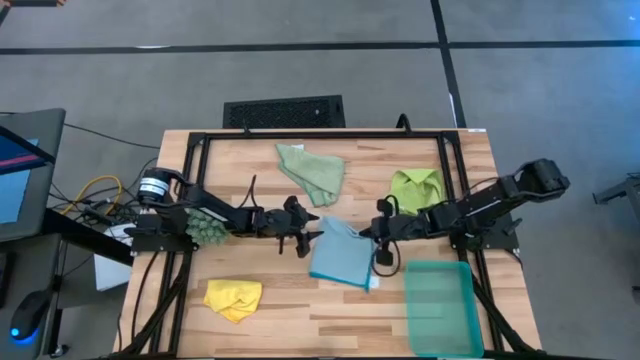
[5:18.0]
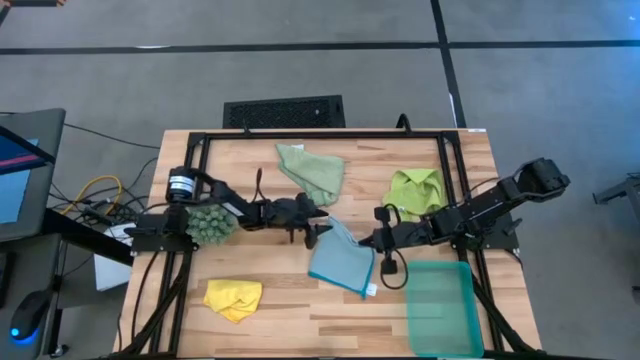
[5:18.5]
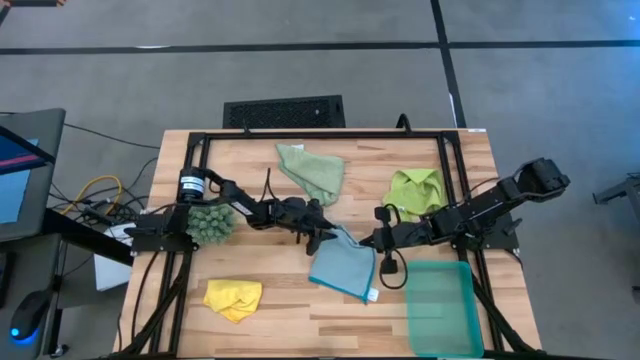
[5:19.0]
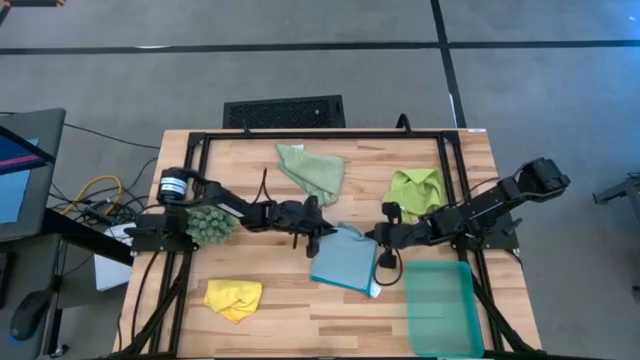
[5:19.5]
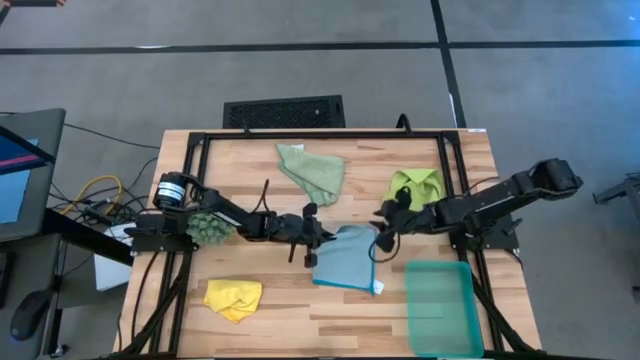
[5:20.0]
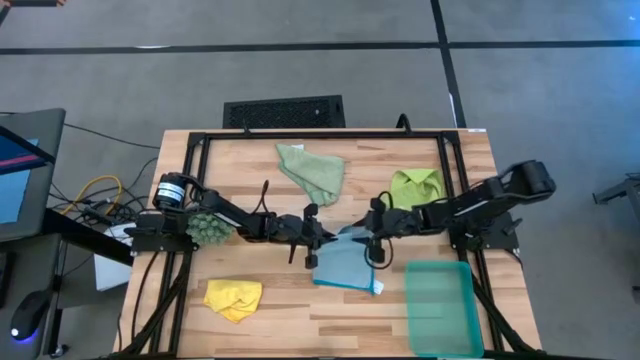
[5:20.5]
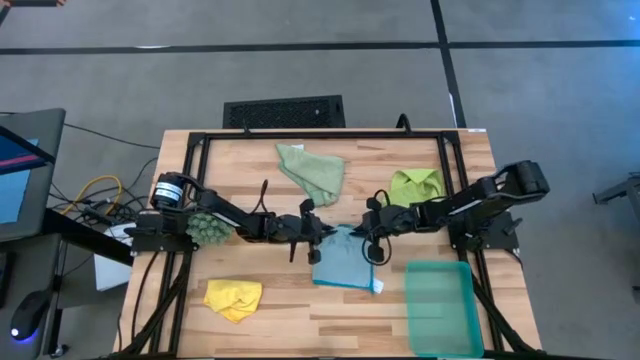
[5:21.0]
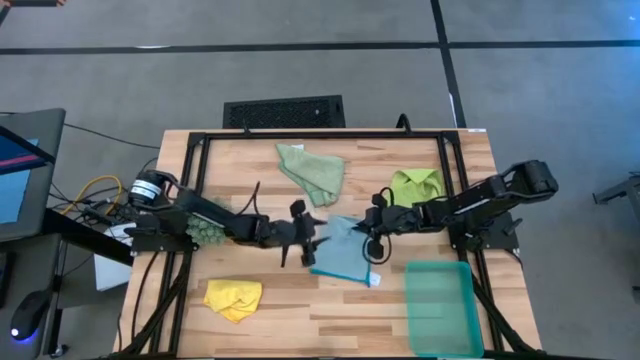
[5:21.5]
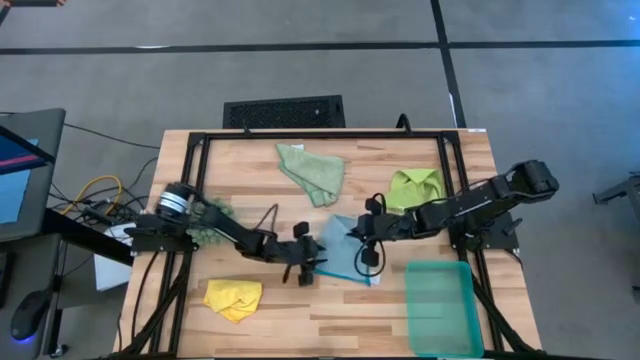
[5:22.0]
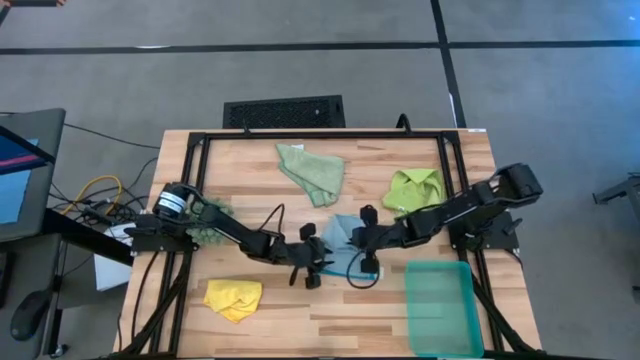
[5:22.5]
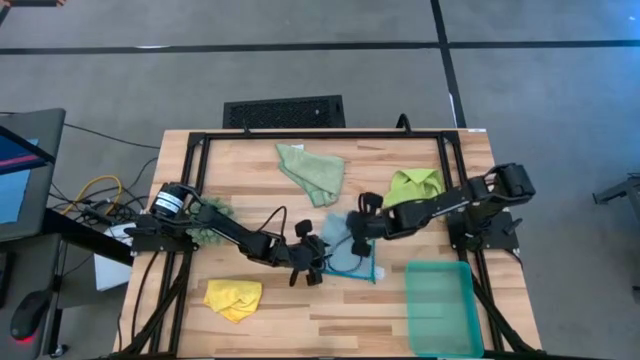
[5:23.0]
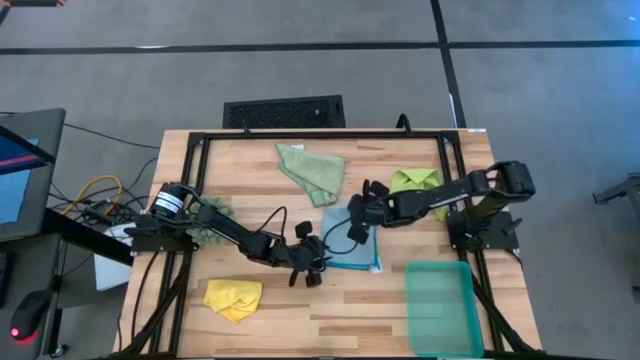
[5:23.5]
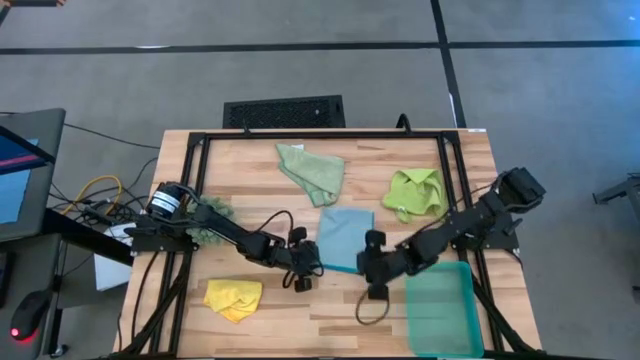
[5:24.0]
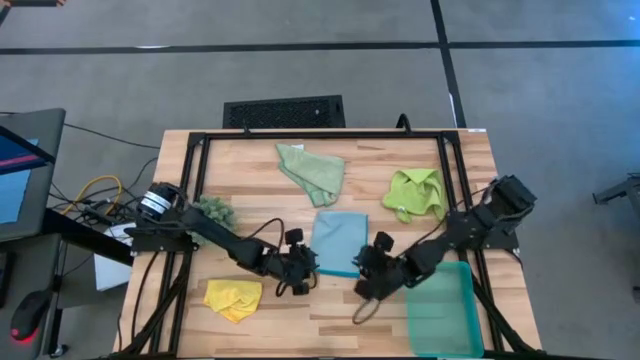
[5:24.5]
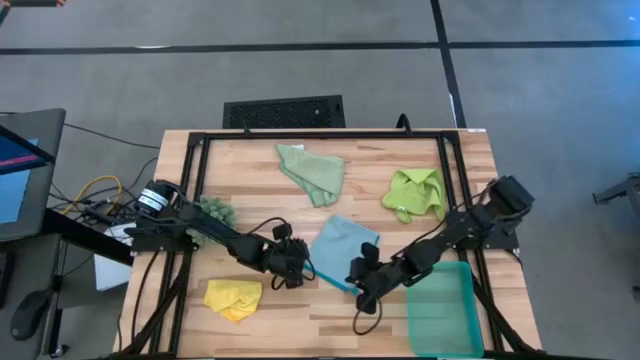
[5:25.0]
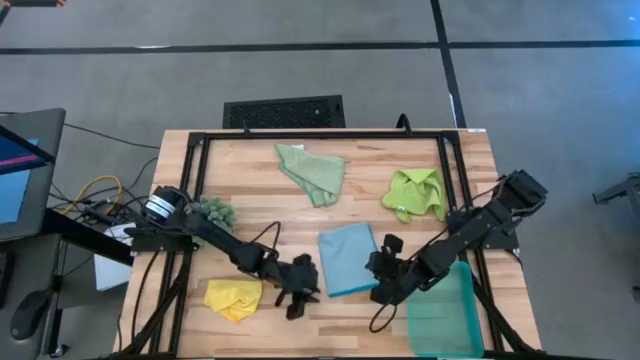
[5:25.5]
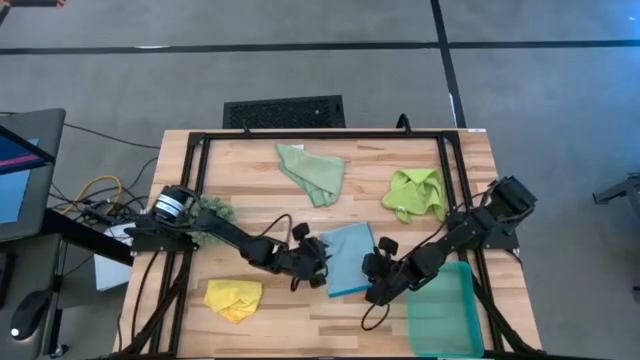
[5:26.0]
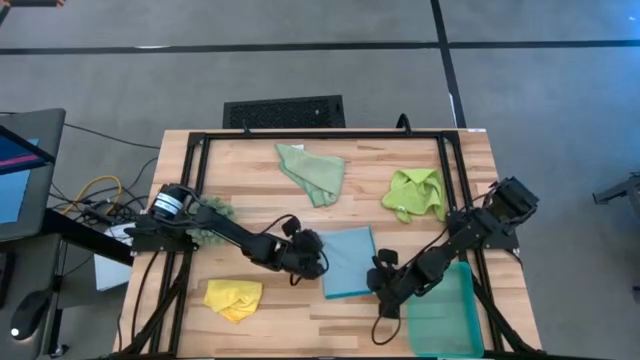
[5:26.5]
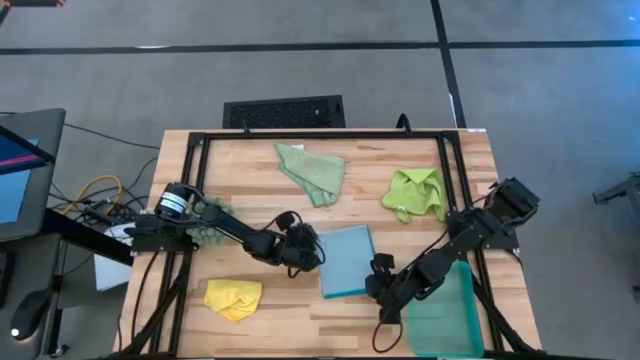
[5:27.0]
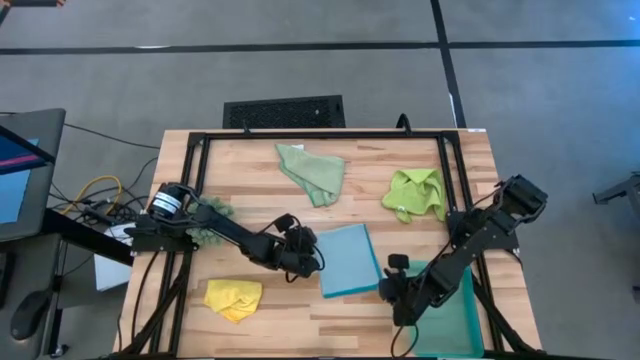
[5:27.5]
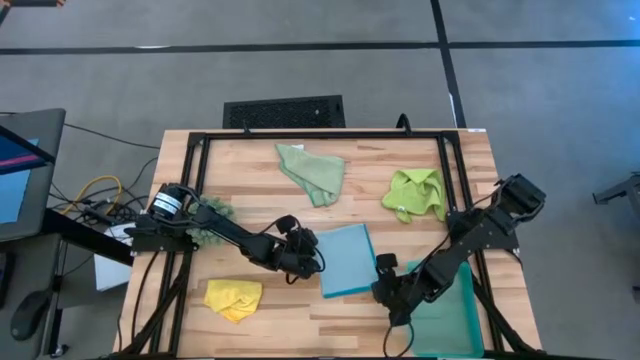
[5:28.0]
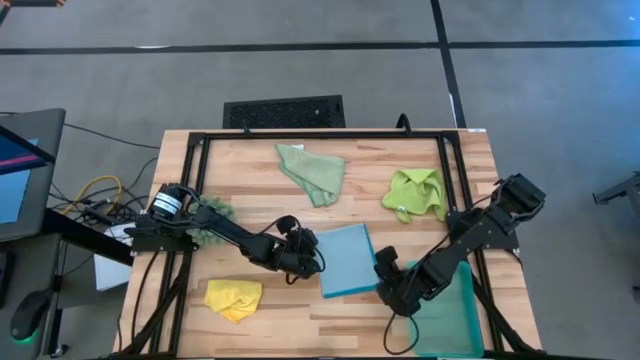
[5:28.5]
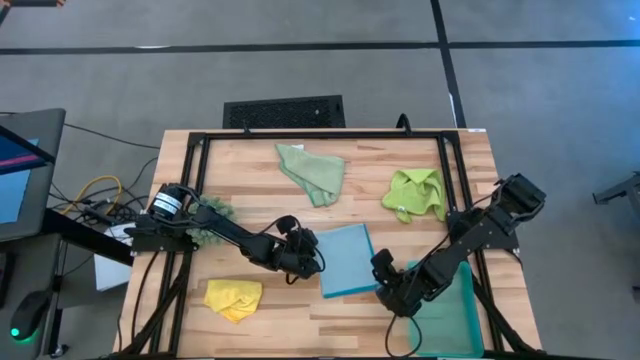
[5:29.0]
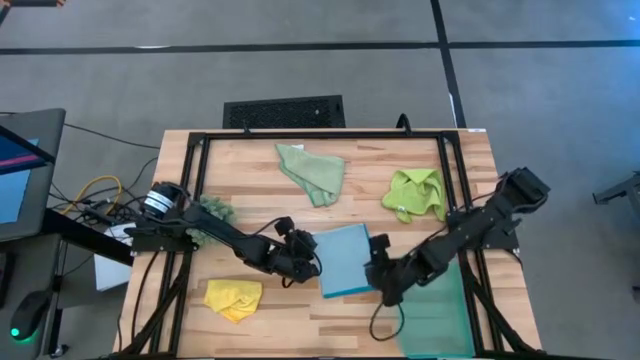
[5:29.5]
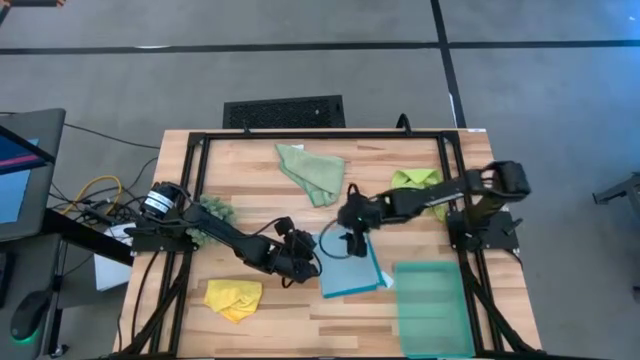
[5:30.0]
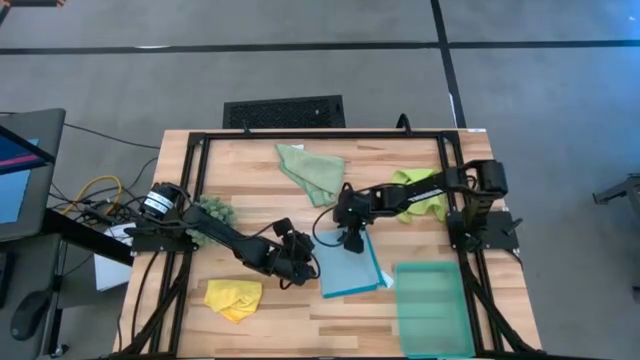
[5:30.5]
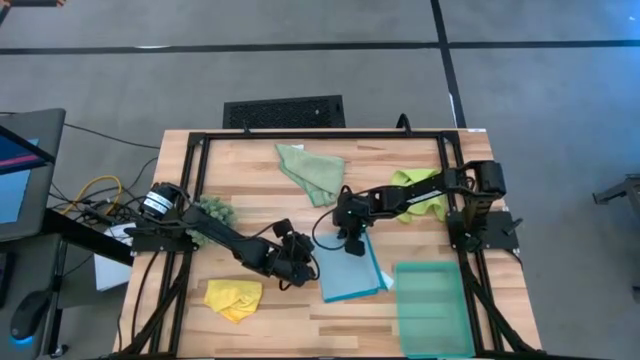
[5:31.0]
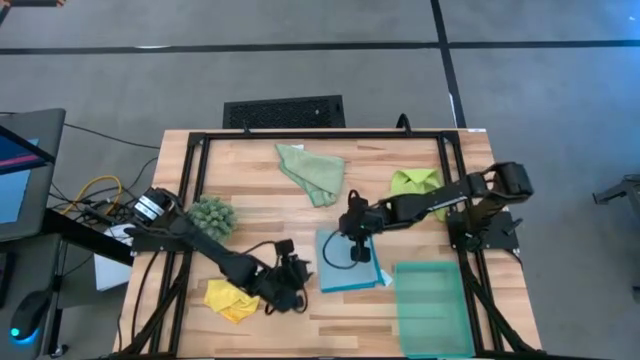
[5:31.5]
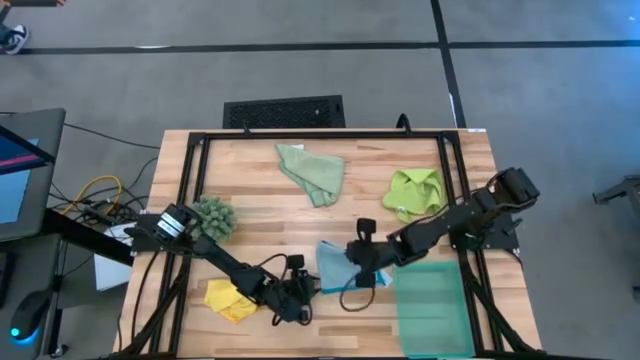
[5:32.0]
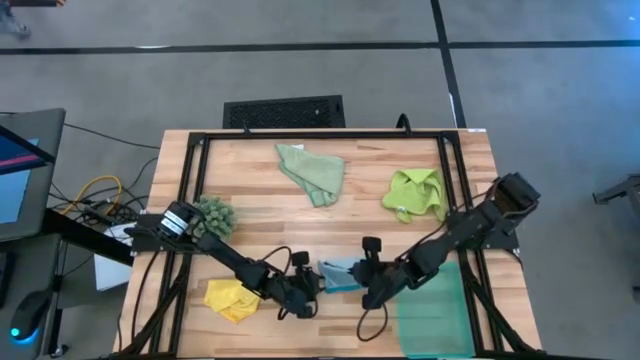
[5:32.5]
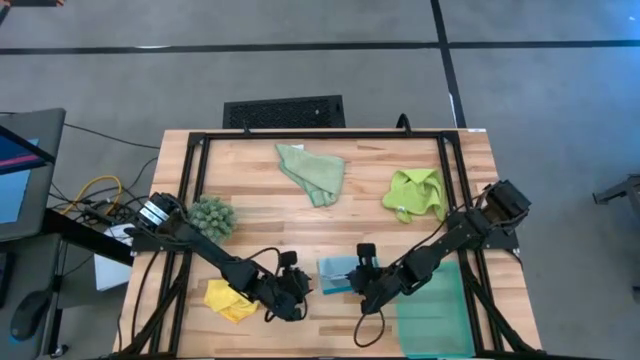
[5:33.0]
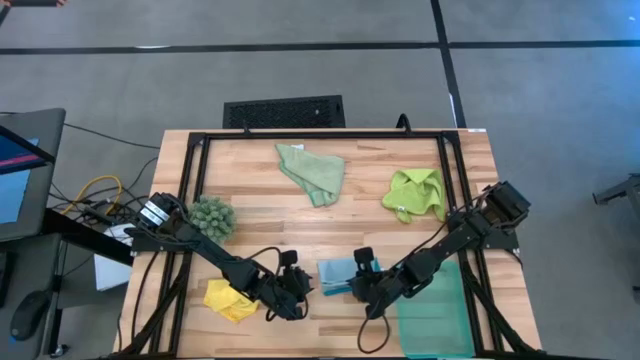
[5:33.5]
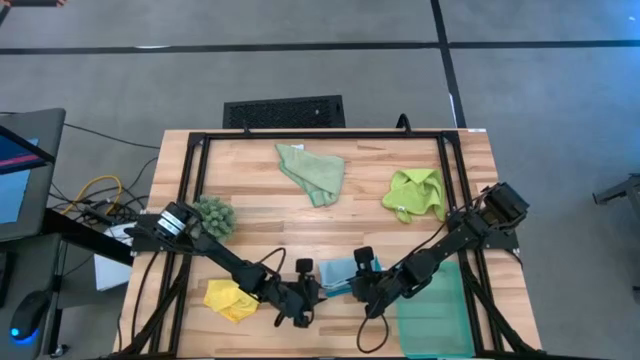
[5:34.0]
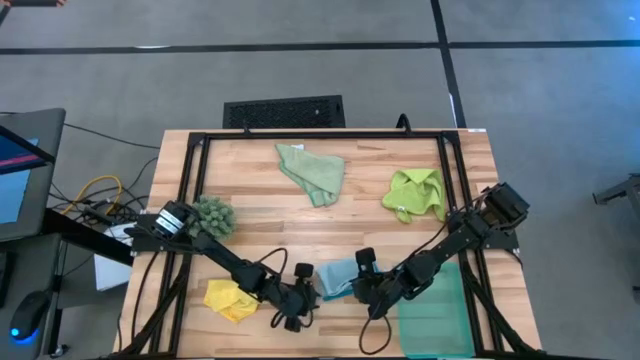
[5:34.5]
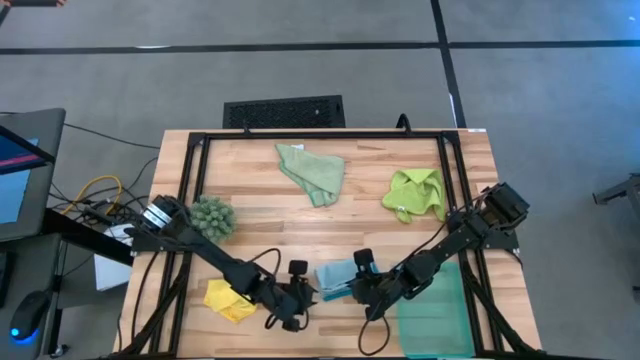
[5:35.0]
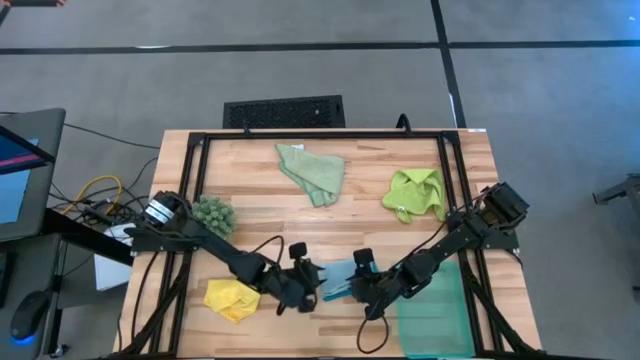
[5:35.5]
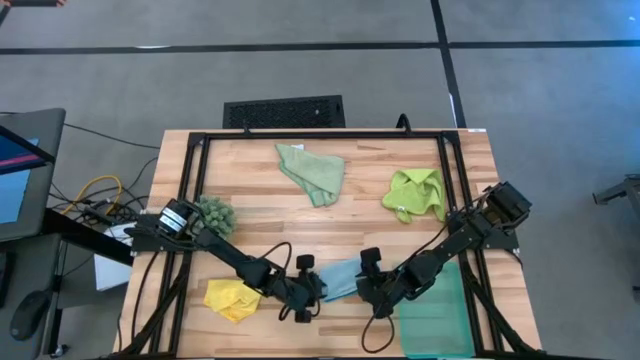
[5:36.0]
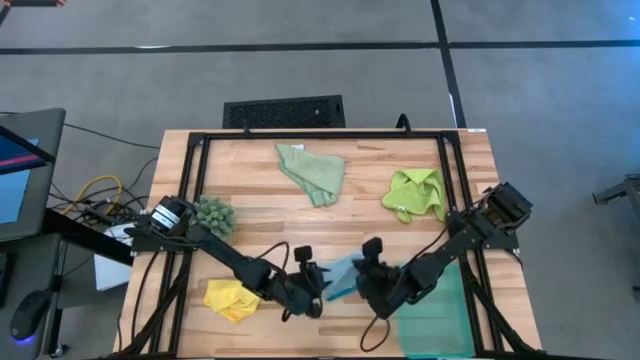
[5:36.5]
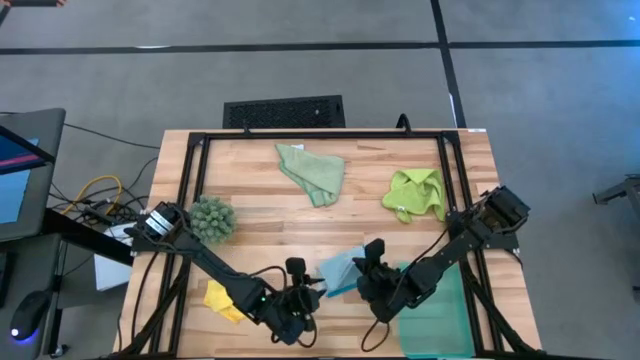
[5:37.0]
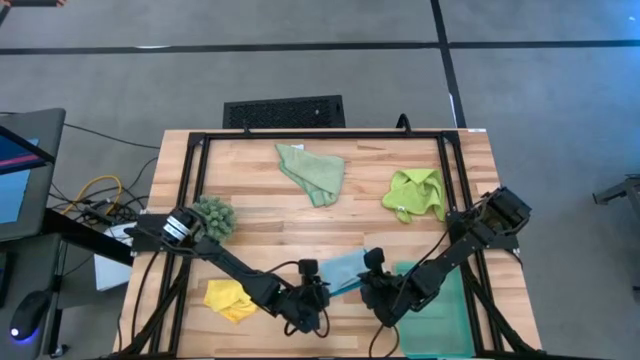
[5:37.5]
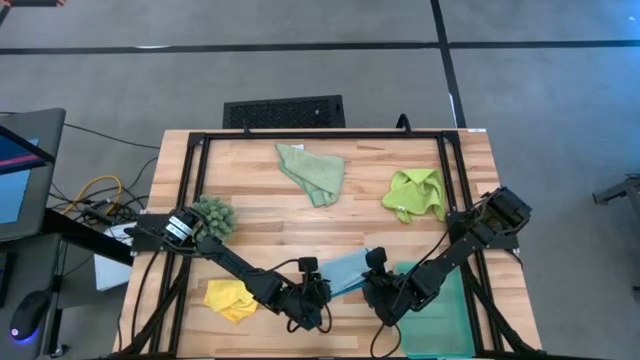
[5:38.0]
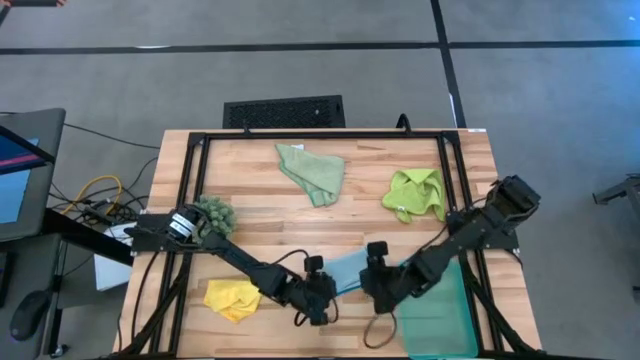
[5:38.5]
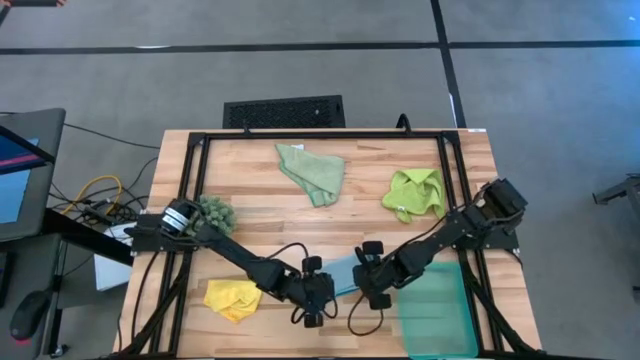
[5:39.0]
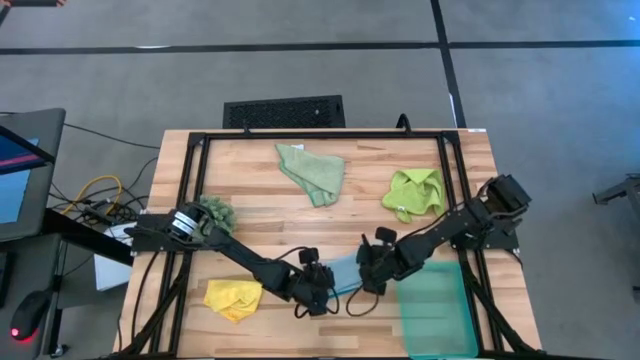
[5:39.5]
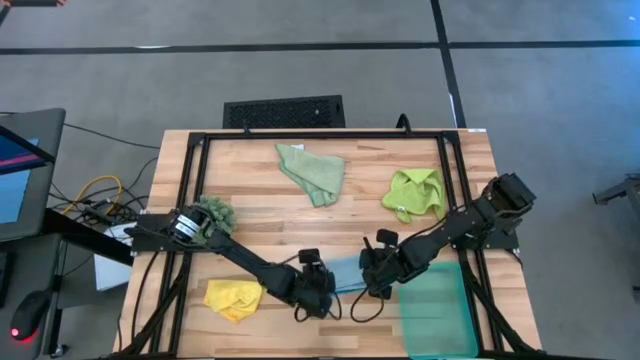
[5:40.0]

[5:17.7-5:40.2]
Task: Fold microfiber towels
Fold the blue microfiber cloth
